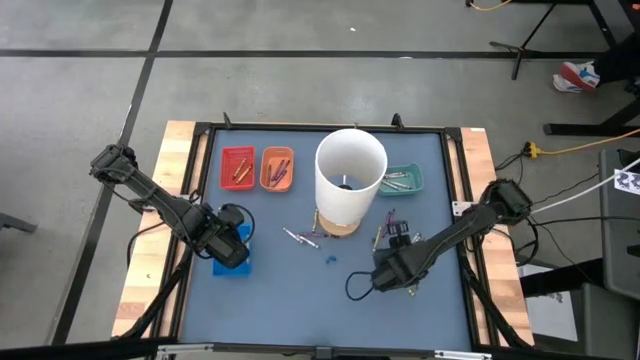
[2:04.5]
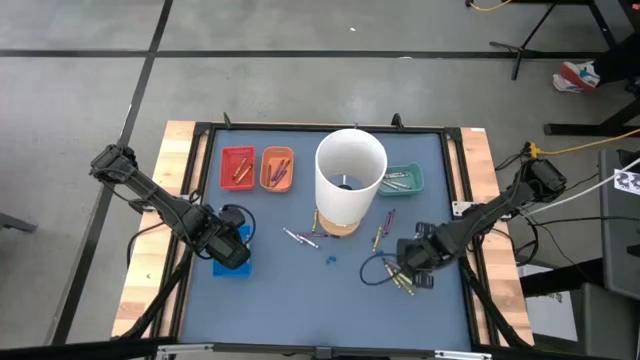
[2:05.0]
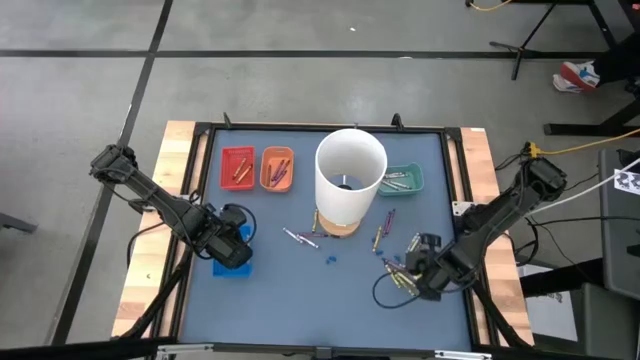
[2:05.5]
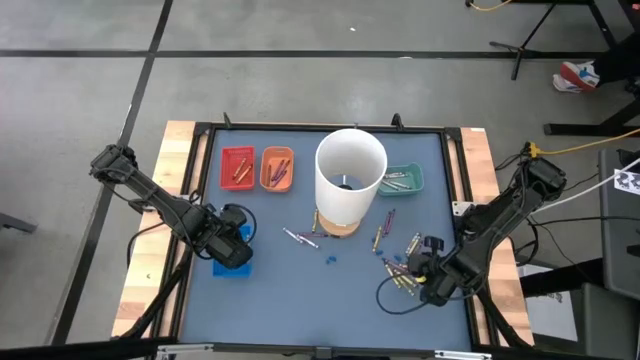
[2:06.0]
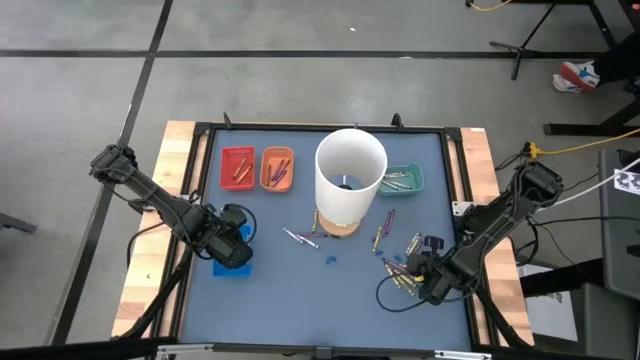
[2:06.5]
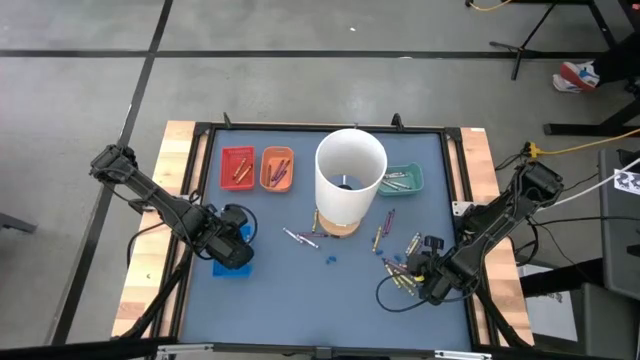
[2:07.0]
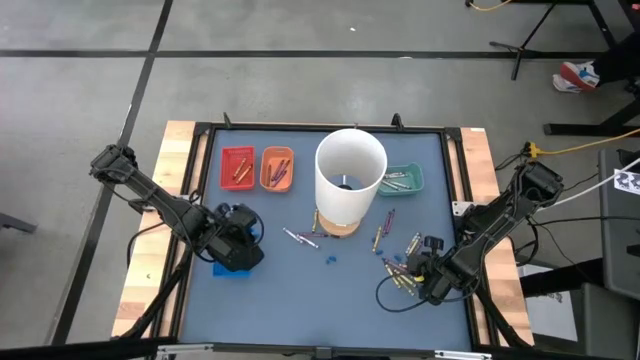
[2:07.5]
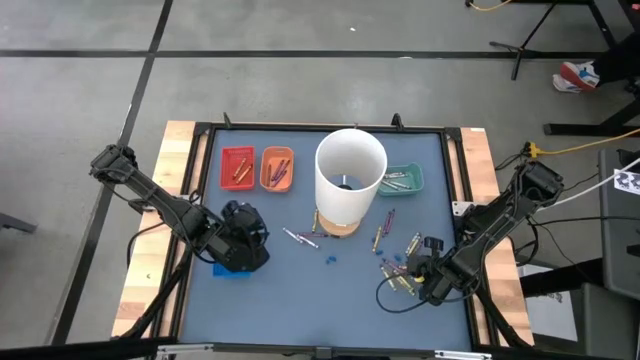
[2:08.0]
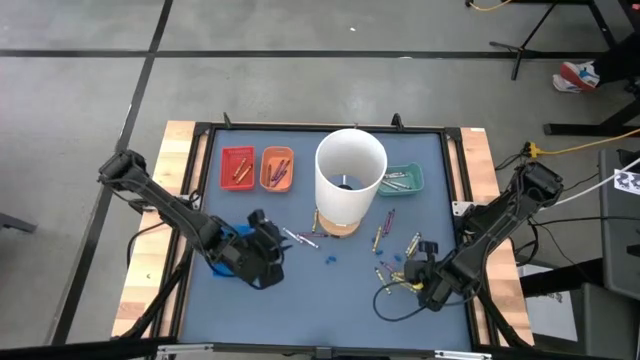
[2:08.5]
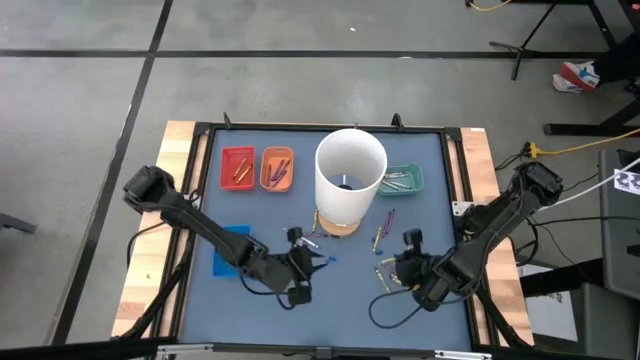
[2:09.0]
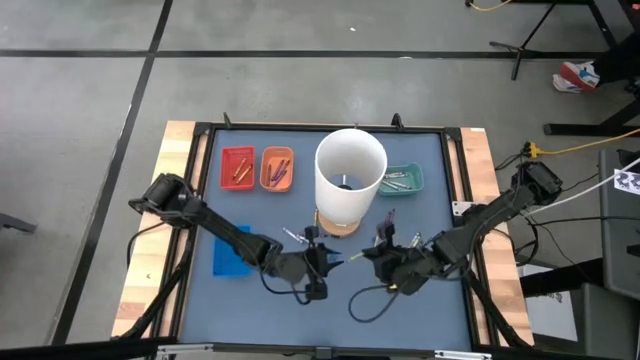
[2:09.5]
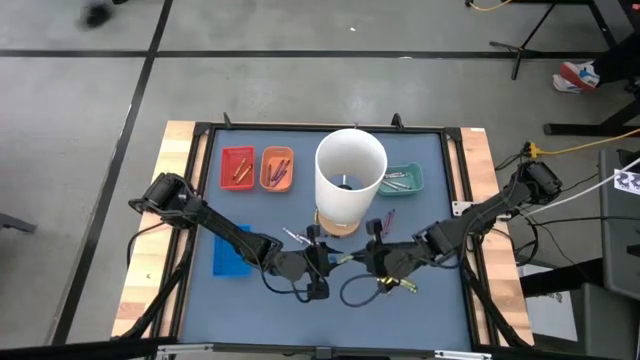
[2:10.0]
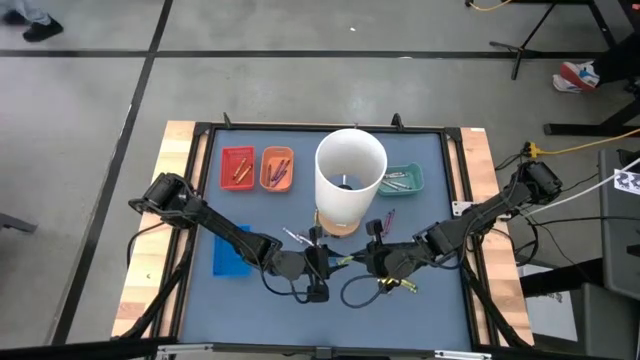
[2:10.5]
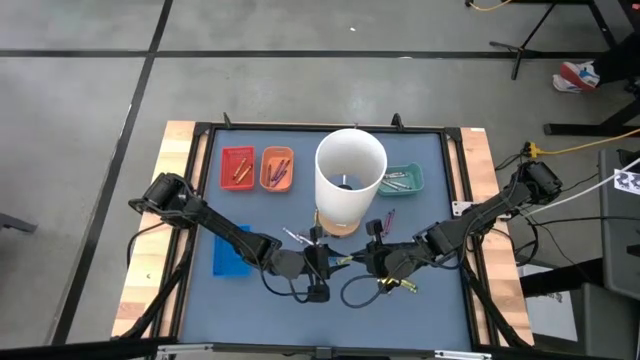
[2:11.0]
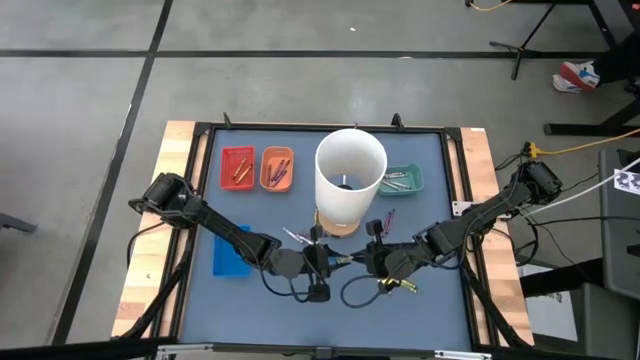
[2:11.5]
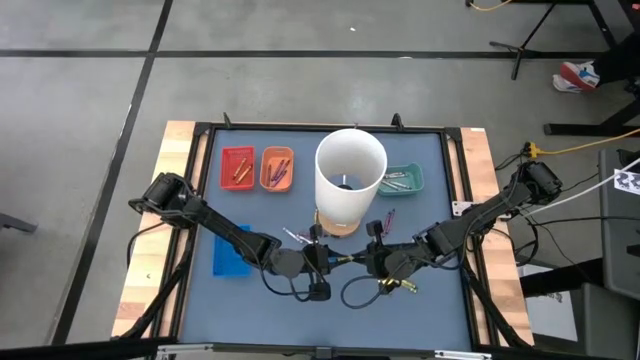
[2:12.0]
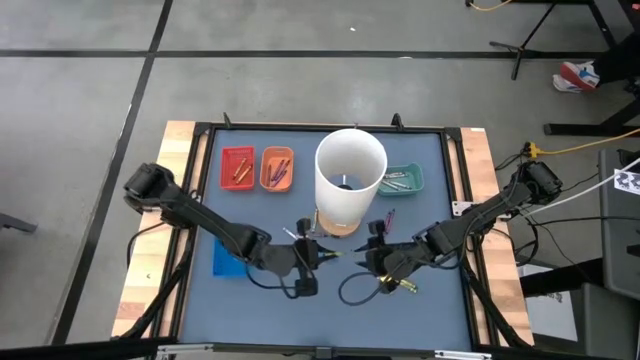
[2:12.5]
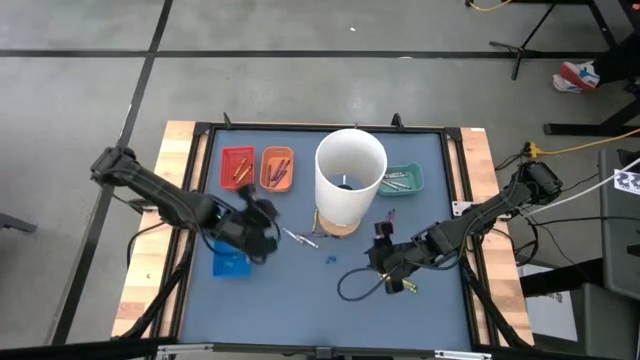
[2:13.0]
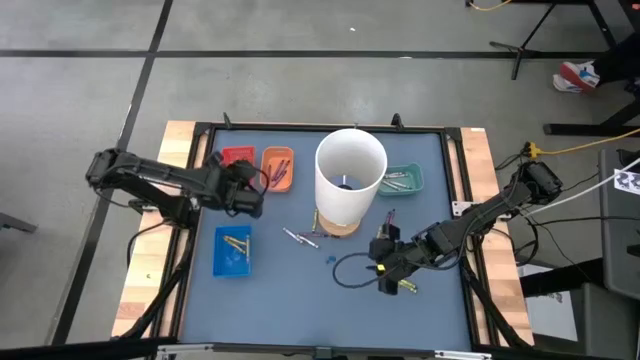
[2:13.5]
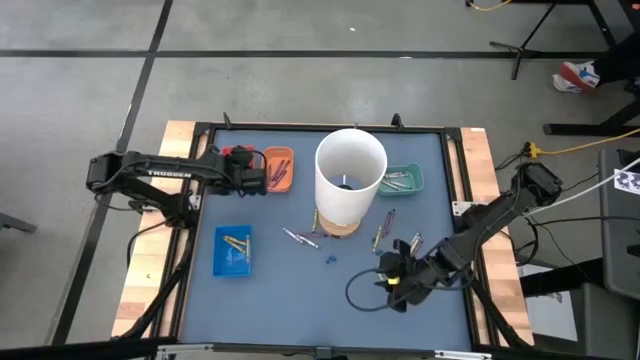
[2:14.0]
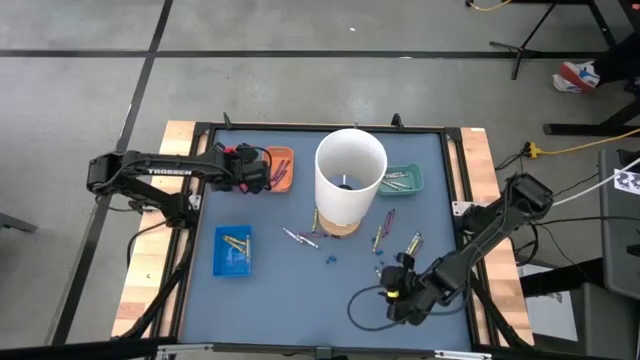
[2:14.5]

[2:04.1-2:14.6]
Task: Sort crayons
Put the green crayon into the red bin

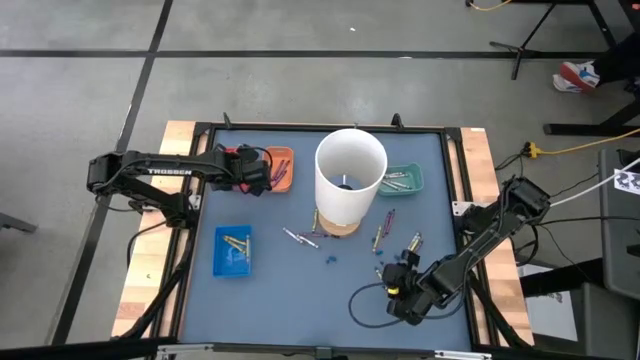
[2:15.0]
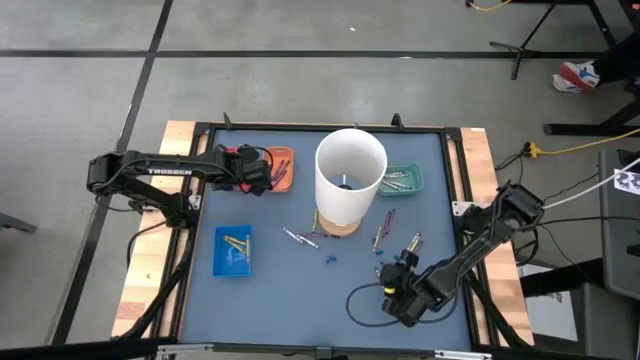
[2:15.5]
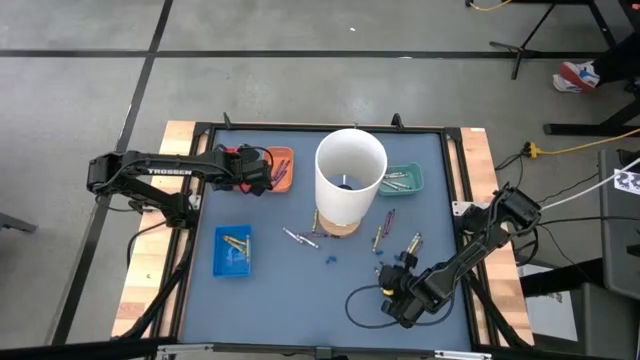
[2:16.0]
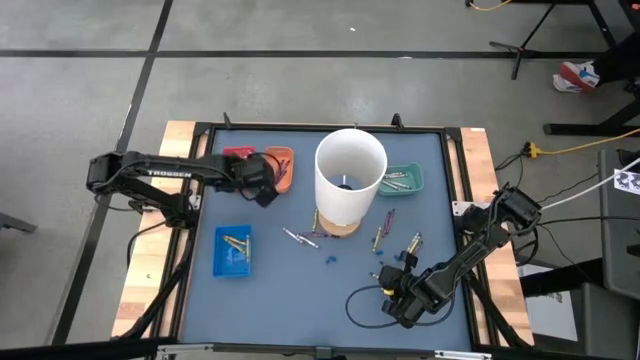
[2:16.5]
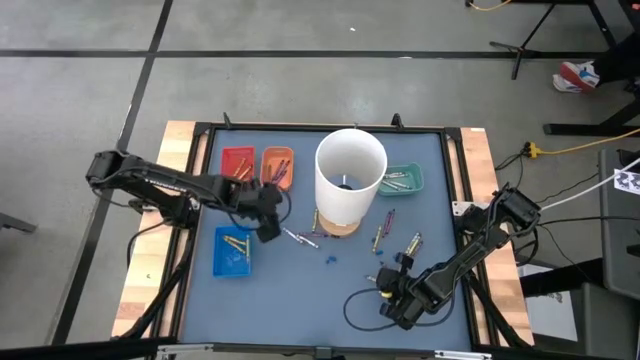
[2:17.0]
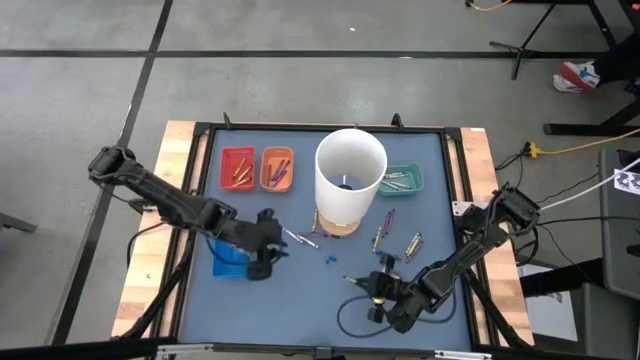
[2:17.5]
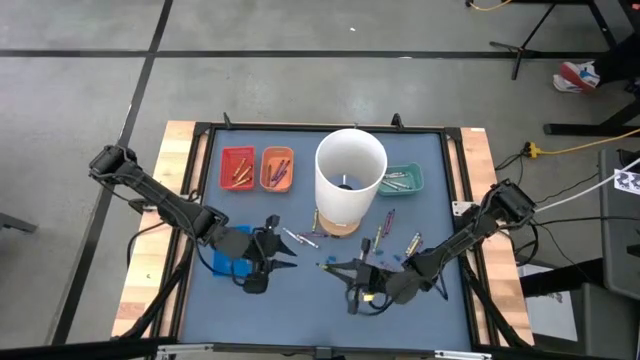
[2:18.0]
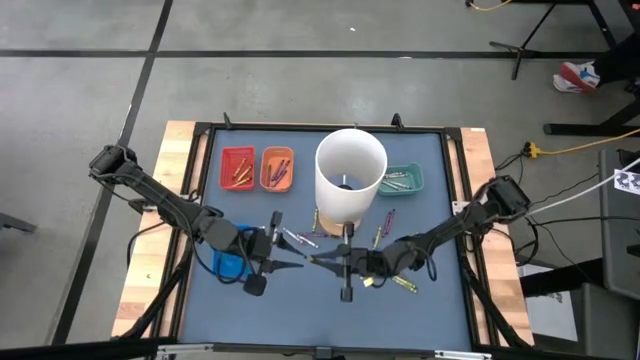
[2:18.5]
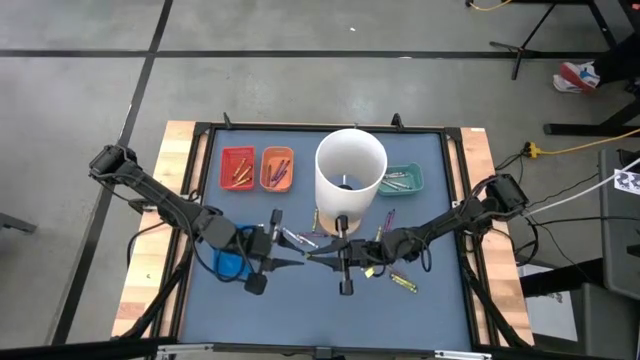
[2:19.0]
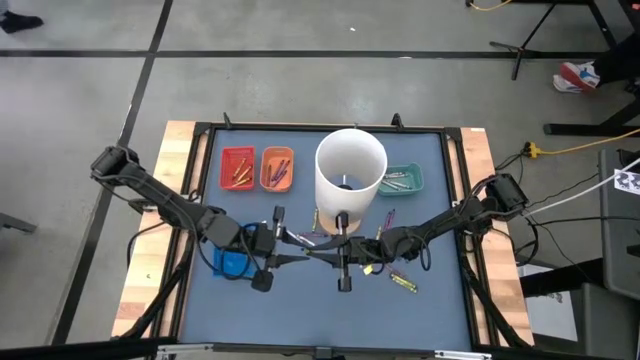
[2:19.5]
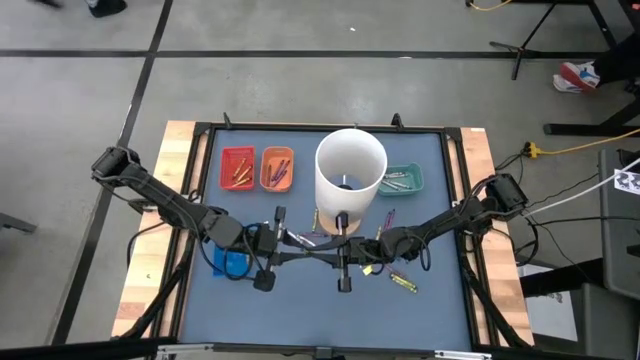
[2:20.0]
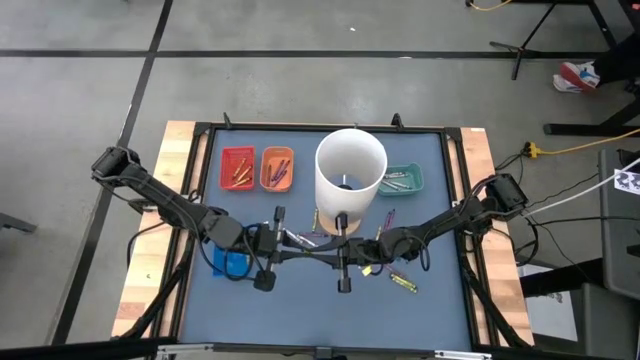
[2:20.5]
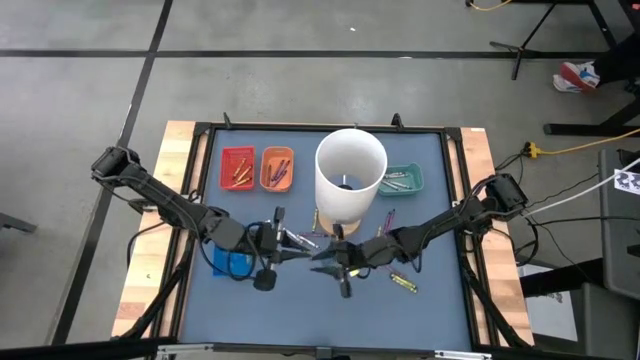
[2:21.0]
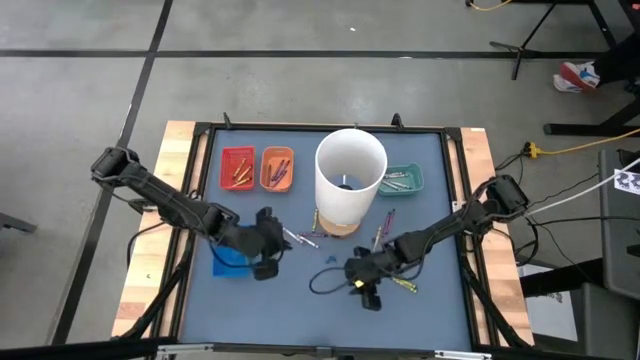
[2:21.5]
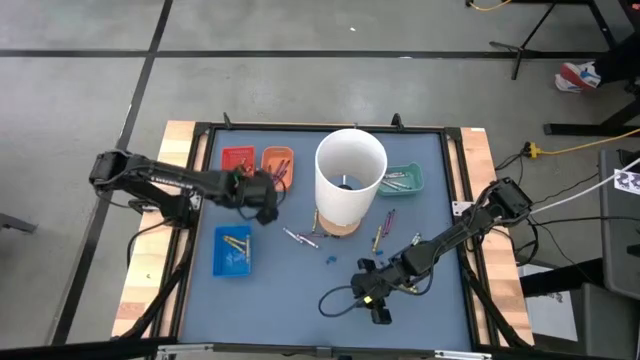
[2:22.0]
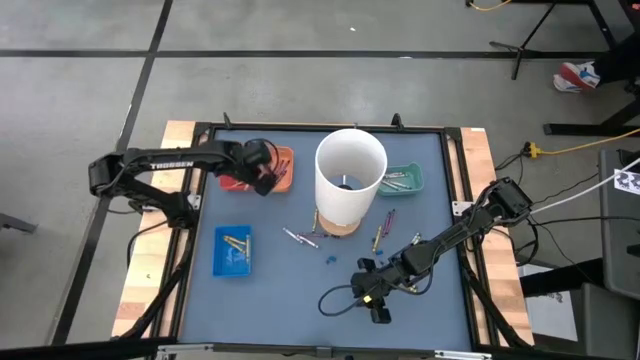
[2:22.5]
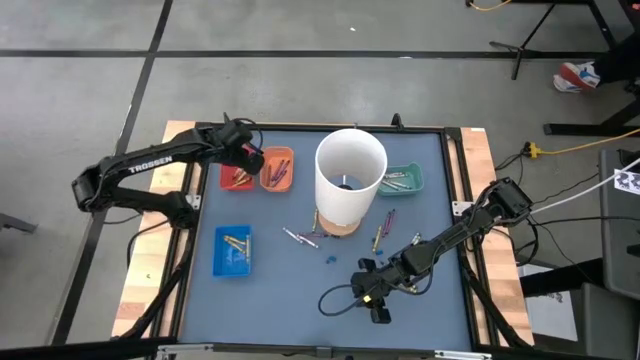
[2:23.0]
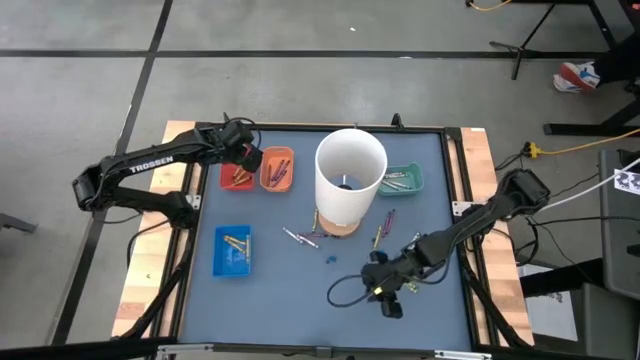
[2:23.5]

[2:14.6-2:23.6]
Put the green crayon into the red bin

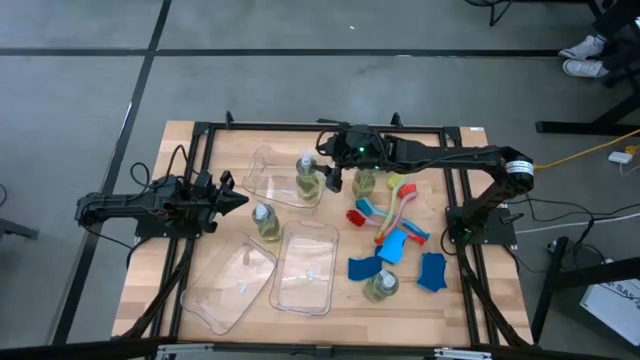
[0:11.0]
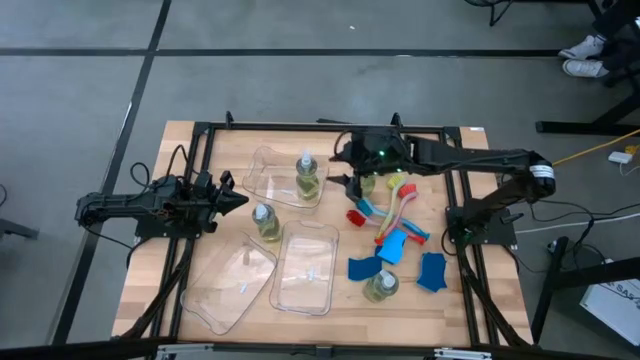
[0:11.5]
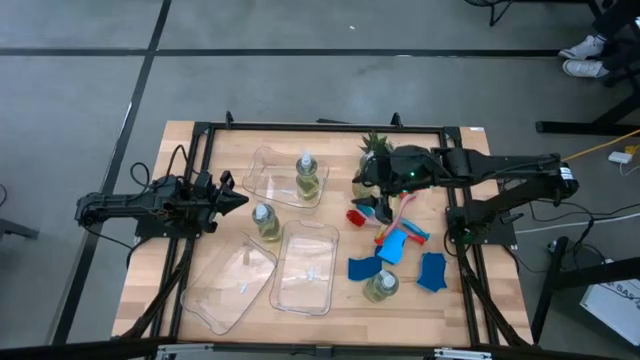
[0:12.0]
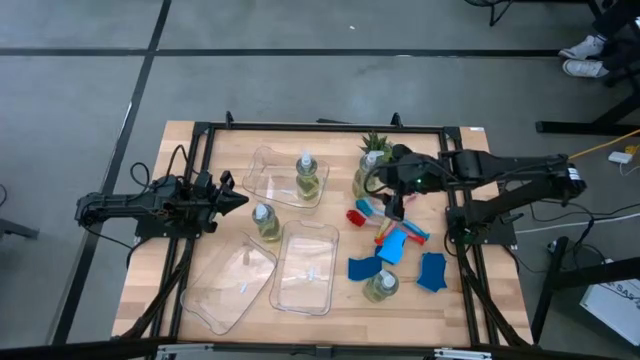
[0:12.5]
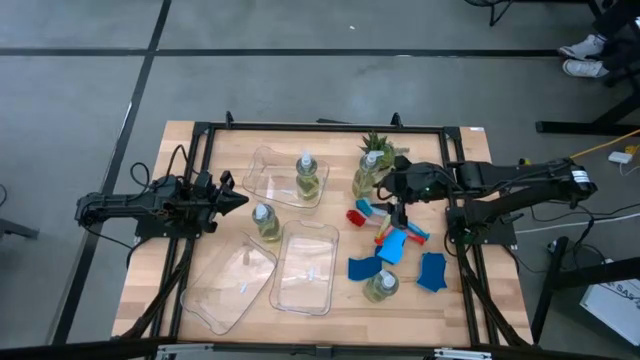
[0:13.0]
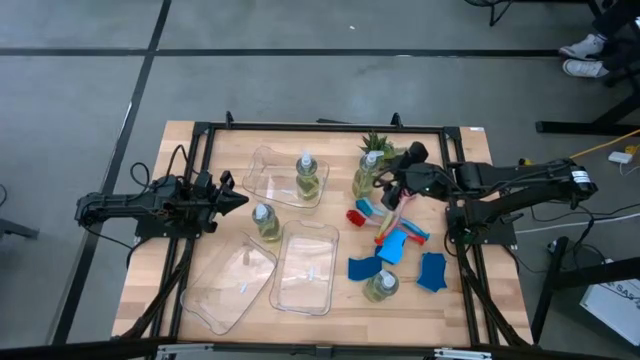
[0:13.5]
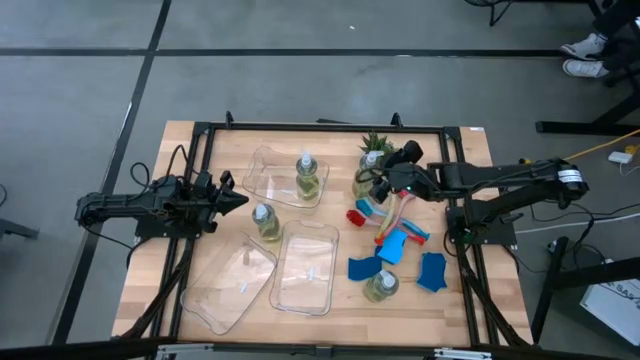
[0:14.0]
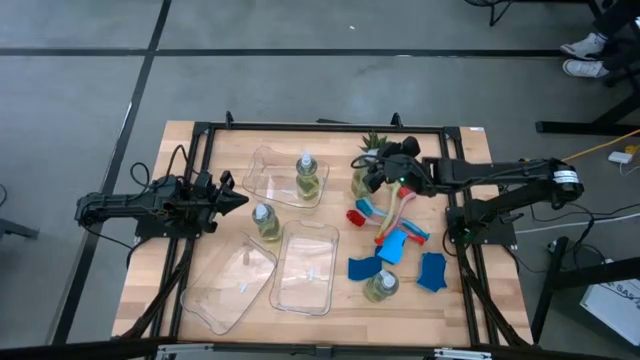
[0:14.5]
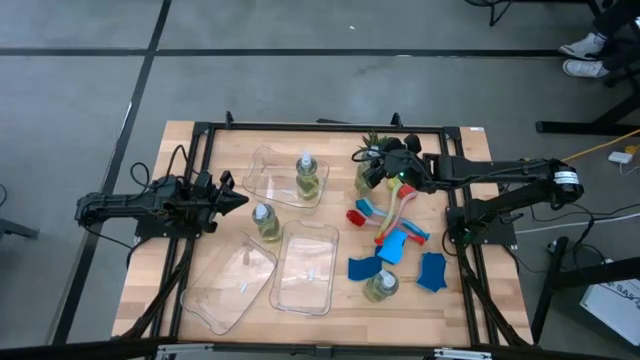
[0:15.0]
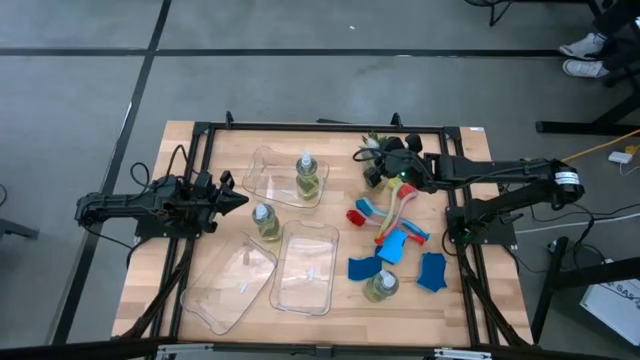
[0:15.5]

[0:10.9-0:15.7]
Task: Pick & Place Kitchen Sink Supplies
Put the green soap dispenser into the top transparent bin
